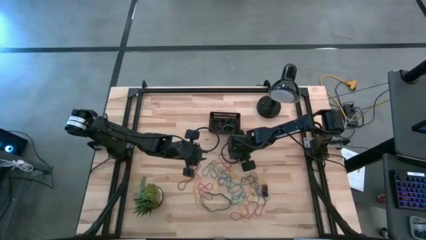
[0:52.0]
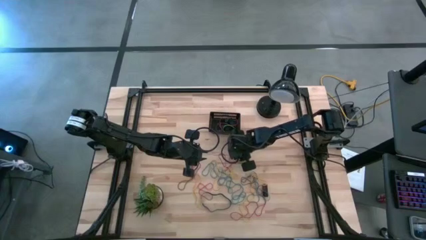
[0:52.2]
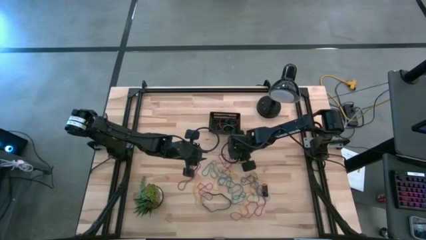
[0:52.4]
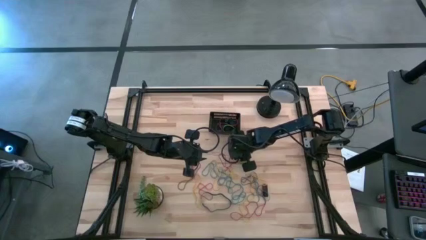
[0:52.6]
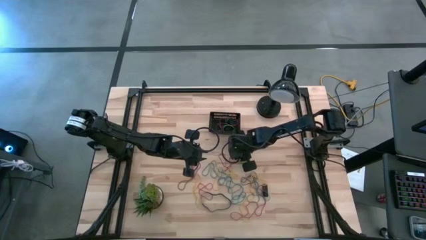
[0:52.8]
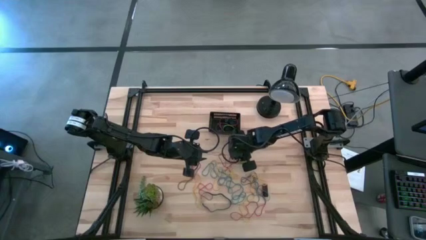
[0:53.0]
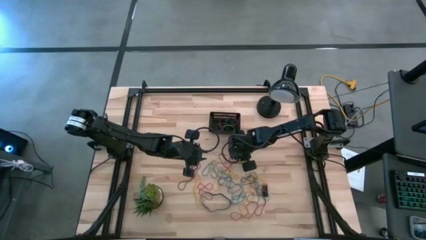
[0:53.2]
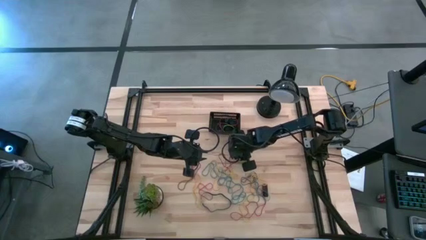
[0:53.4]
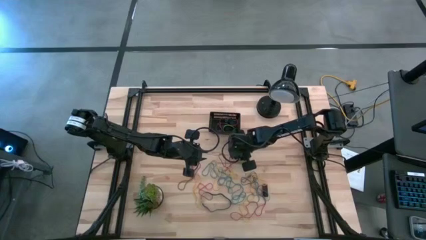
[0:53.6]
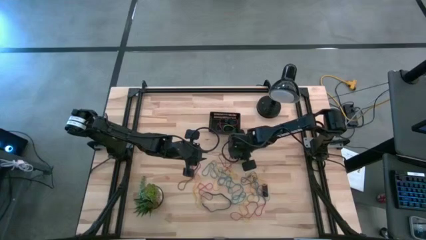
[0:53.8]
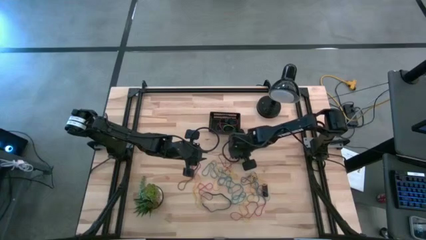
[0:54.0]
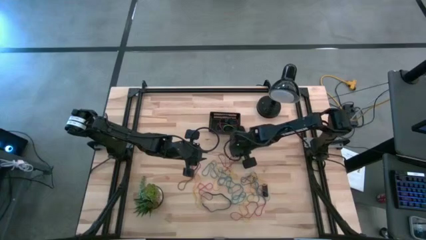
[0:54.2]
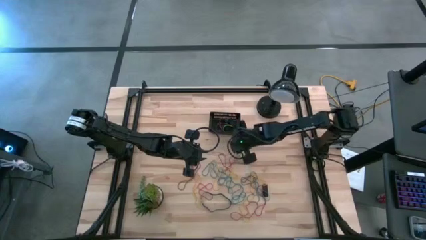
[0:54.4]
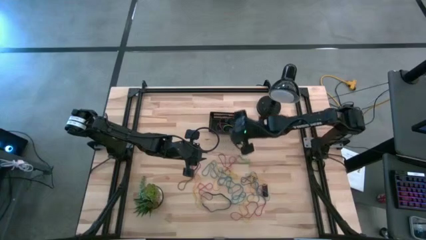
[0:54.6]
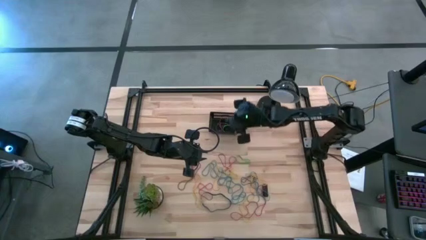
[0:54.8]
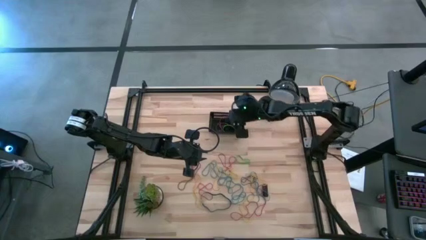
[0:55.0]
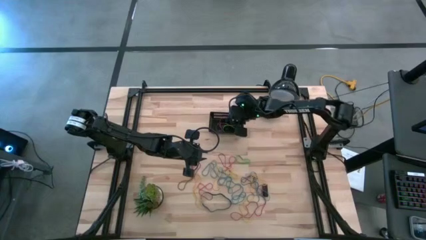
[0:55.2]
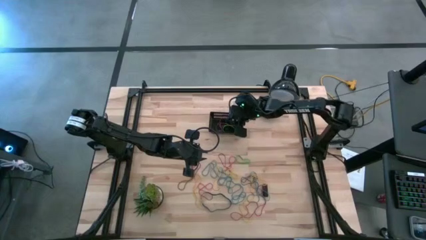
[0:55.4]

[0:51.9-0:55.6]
Task: Pick and place rubber bands into bin
Put the black rubber band into the basket

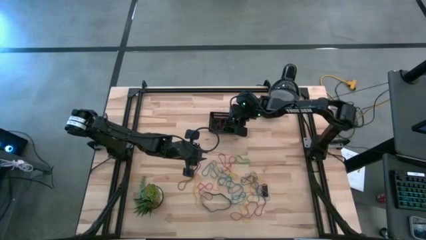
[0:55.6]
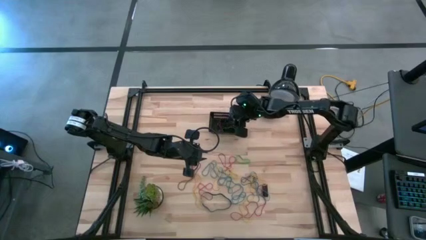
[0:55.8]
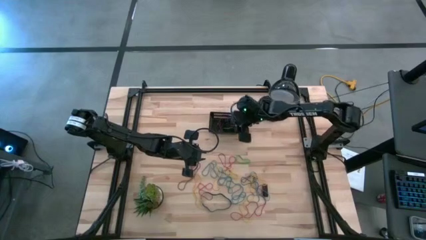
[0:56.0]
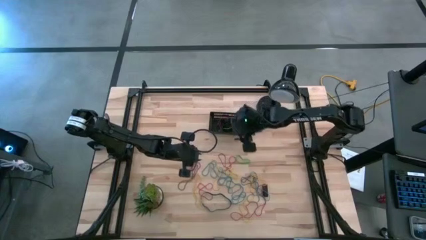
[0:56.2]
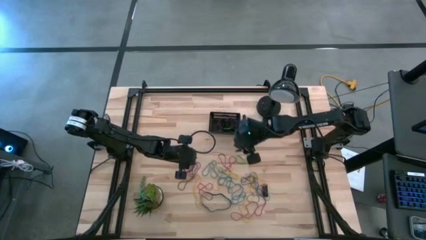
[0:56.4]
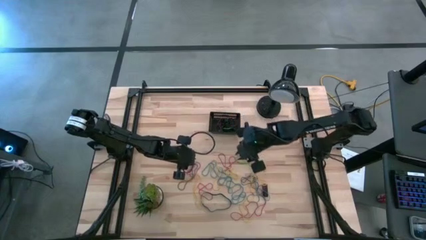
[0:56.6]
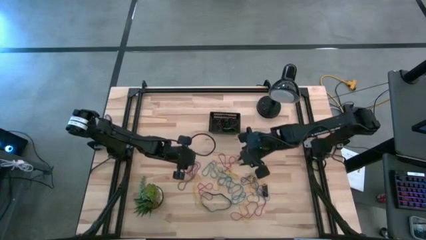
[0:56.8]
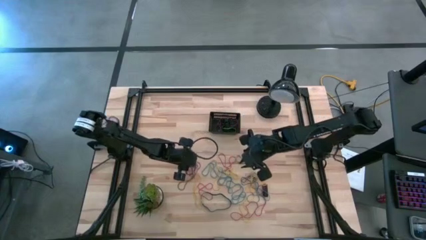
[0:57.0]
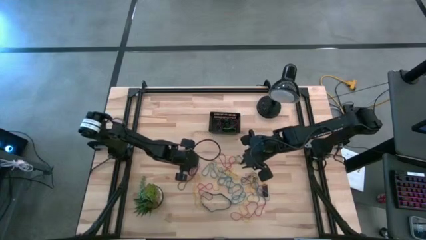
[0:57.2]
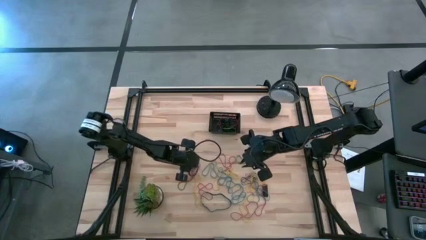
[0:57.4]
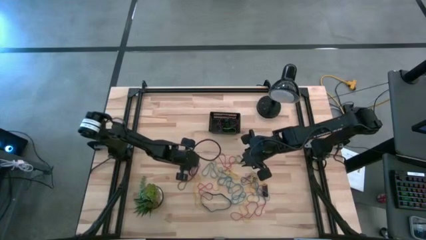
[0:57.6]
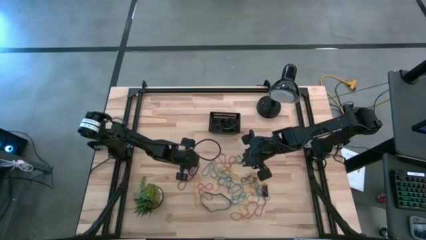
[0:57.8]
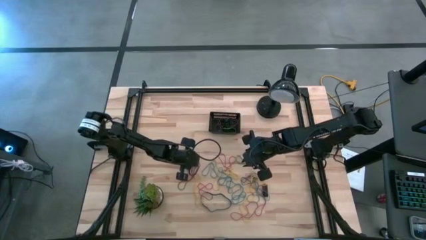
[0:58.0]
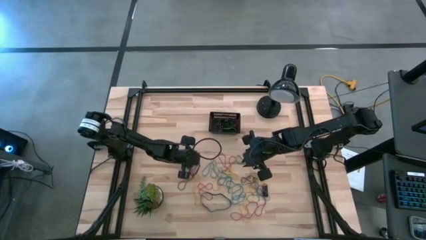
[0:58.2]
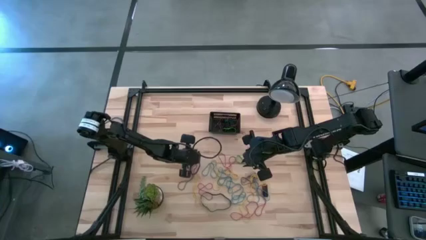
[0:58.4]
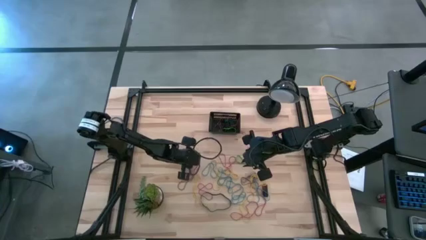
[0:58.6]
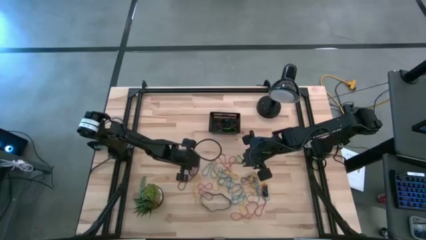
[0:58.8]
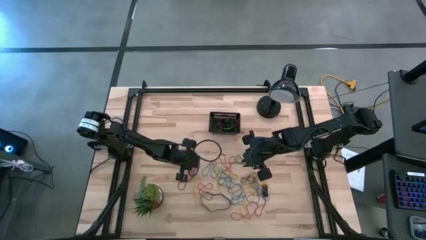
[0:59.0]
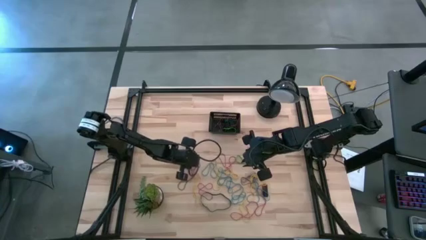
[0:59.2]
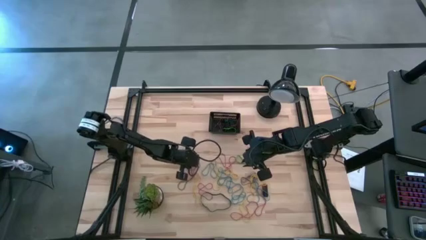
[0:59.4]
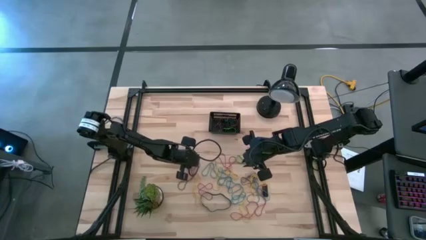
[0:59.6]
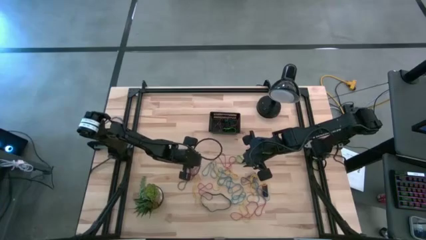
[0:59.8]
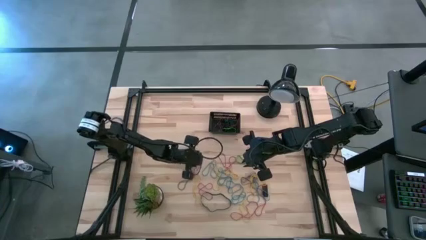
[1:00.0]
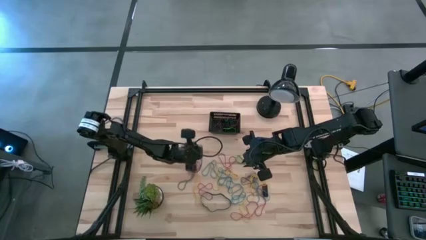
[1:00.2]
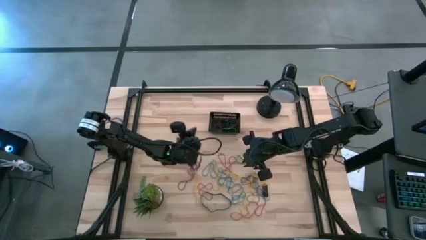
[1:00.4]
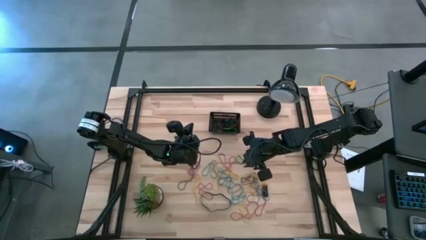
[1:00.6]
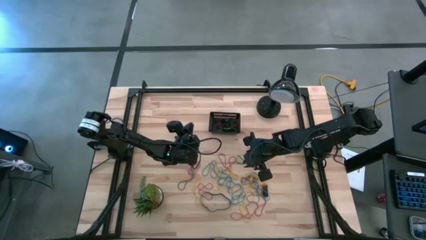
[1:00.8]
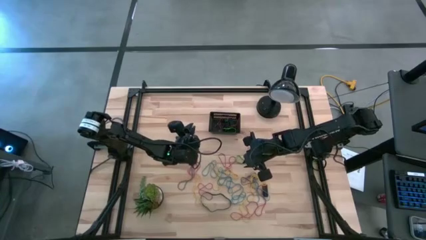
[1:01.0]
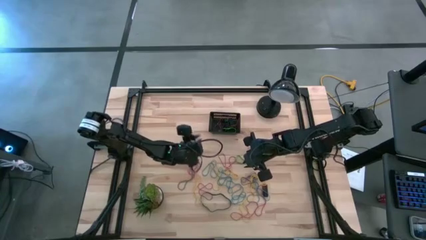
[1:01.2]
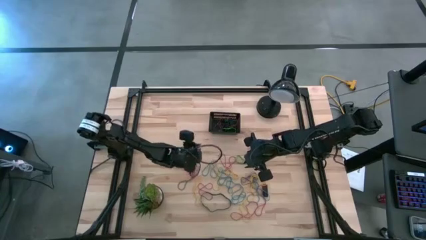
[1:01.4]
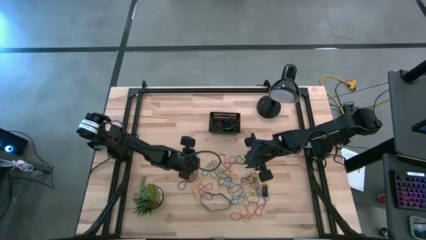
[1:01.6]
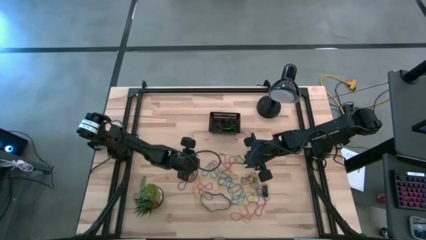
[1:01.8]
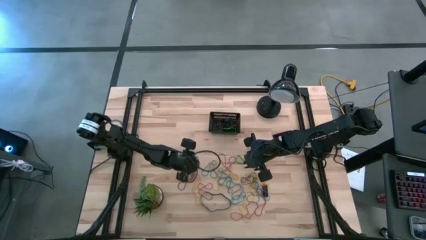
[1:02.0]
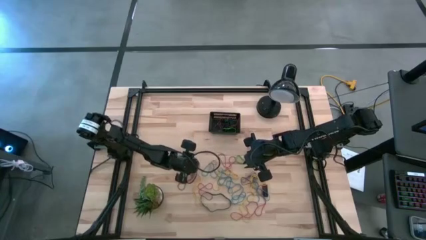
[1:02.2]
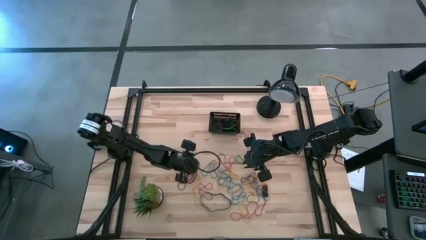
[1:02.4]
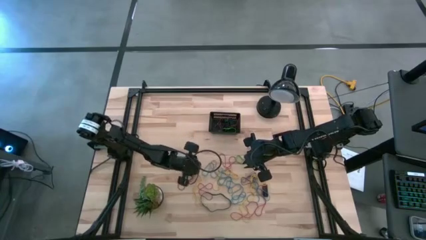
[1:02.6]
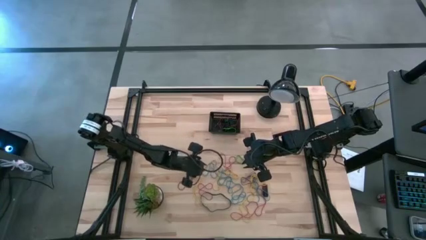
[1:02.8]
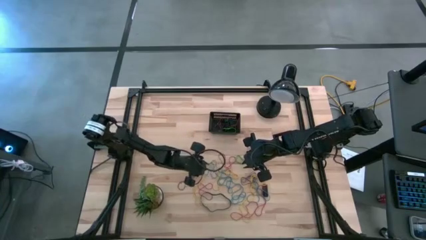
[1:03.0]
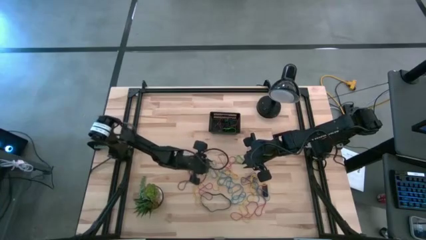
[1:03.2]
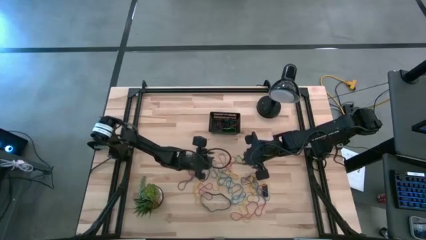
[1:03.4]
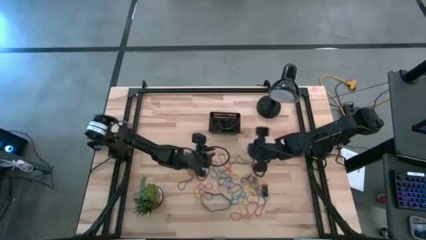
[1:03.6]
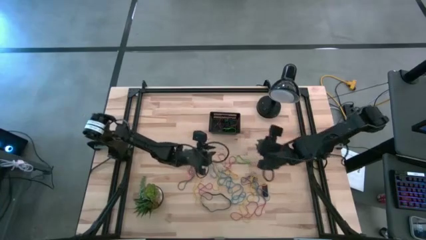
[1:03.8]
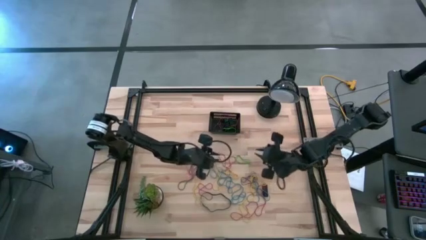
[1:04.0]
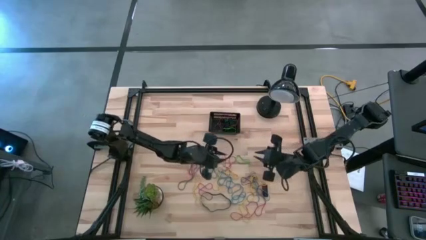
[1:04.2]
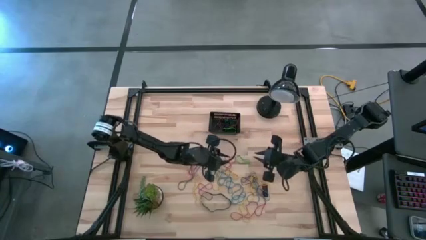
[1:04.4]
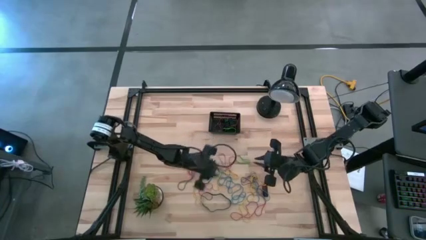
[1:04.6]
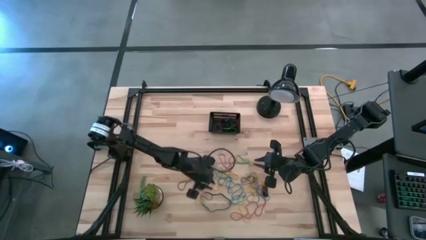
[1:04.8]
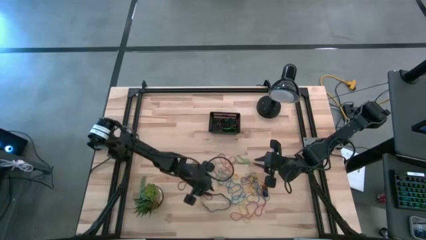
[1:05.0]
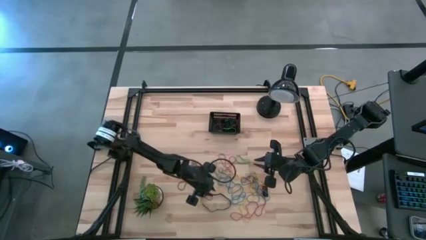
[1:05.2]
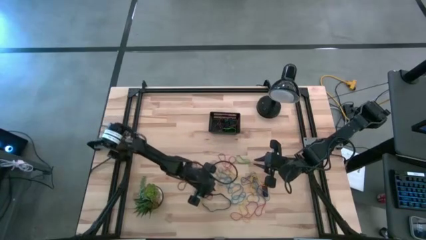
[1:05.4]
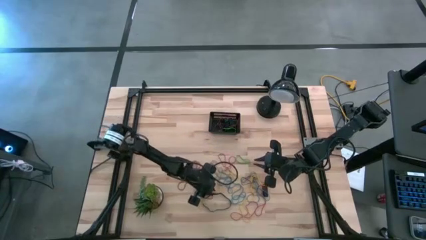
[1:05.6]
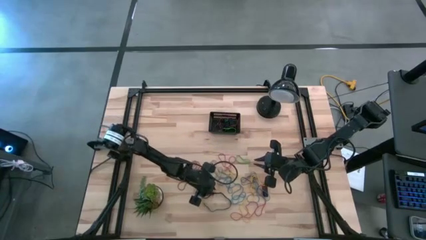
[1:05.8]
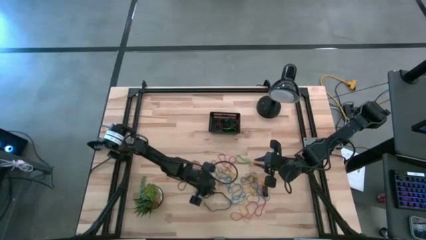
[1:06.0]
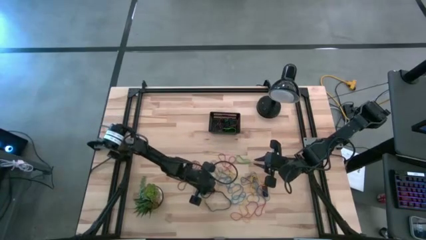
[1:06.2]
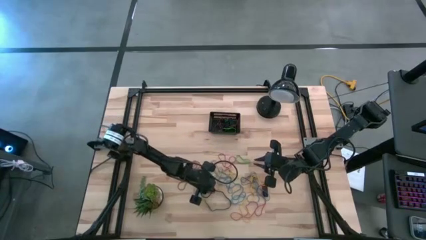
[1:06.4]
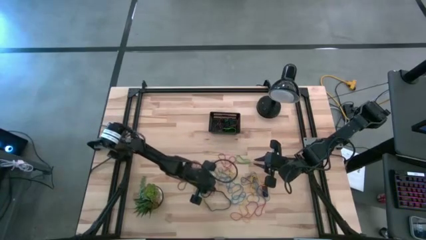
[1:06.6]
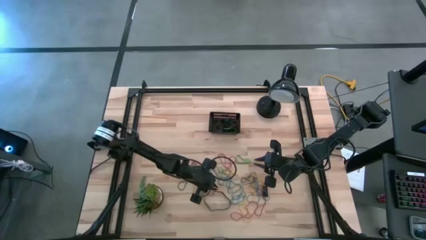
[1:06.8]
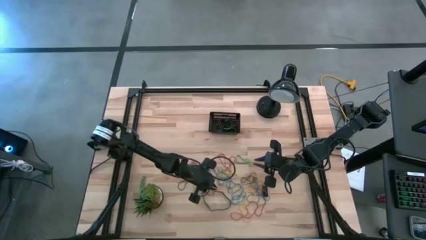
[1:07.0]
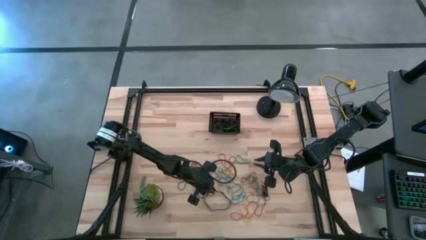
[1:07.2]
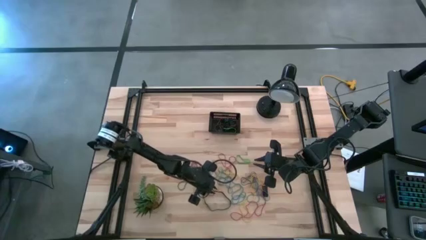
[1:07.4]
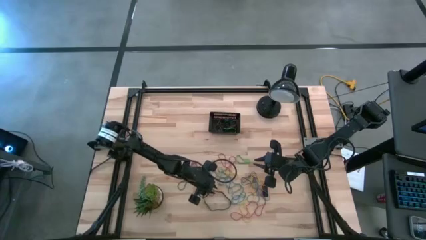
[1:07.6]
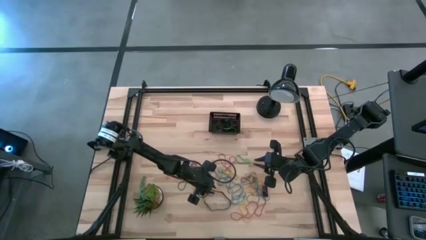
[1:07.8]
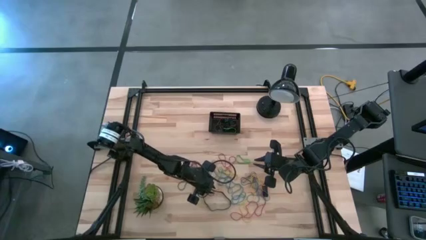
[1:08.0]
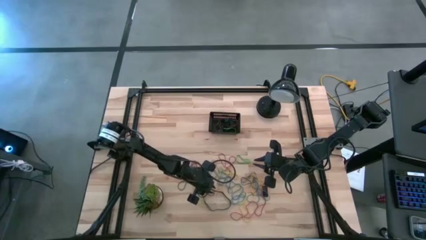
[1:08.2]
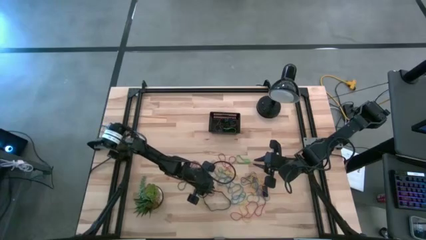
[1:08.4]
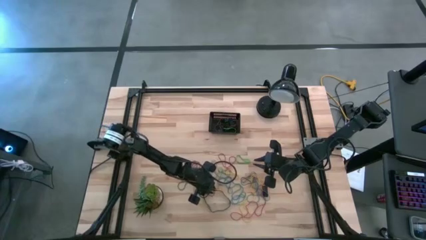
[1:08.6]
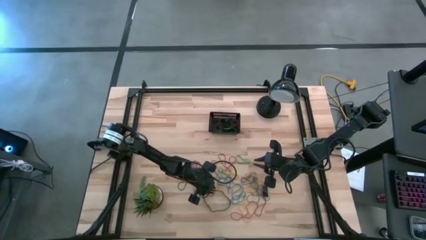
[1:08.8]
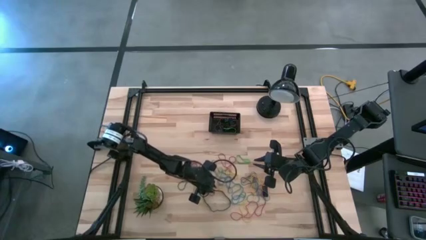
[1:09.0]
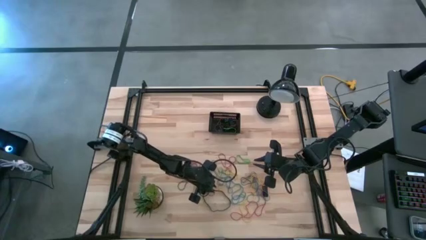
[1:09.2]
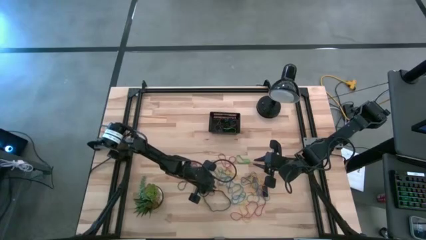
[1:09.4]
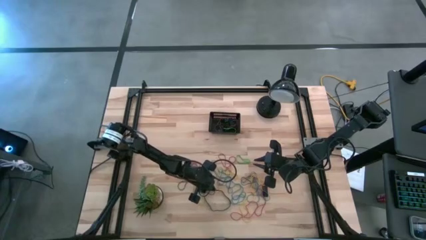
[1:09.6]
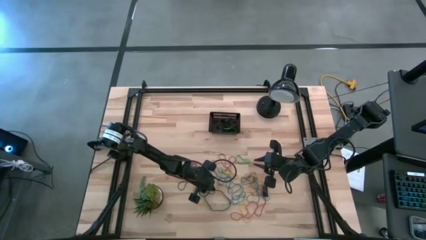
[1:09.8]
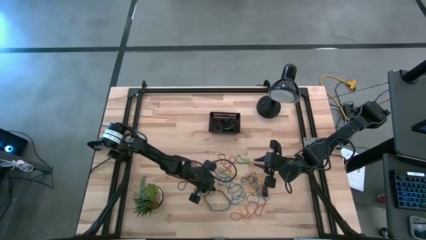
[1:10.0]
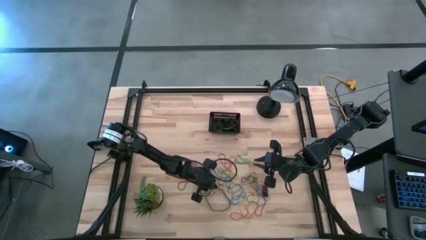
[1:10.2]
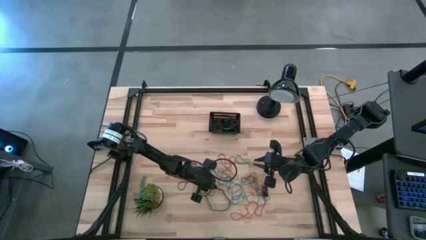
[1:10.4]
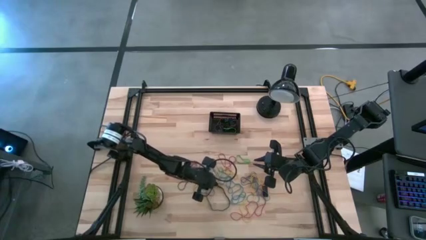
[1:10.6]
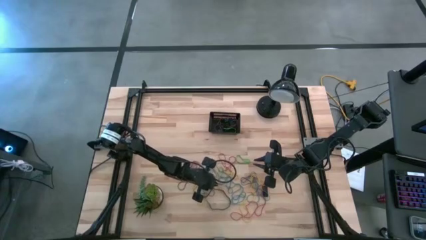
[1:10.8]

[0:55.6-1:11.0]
Put the black rubber band into the basket
